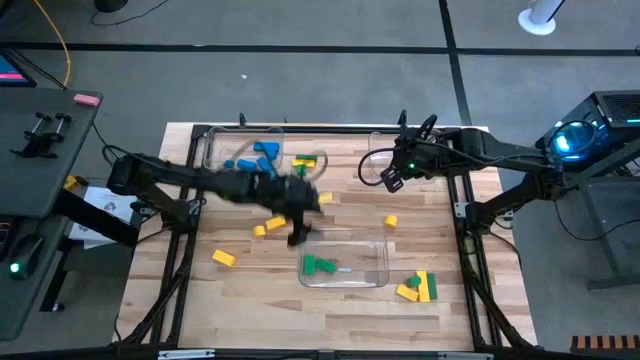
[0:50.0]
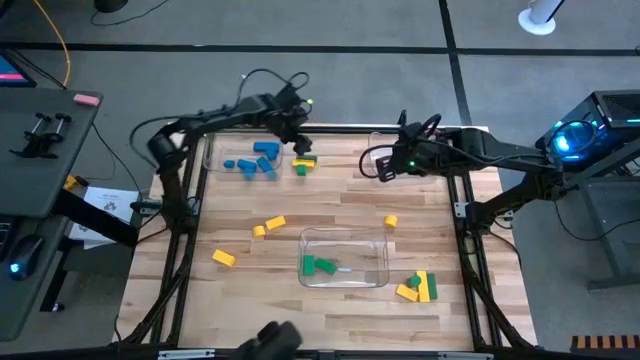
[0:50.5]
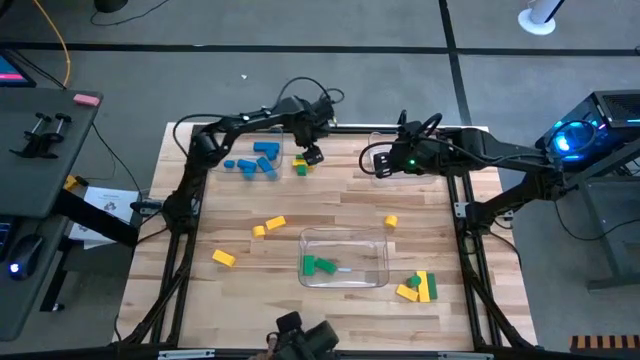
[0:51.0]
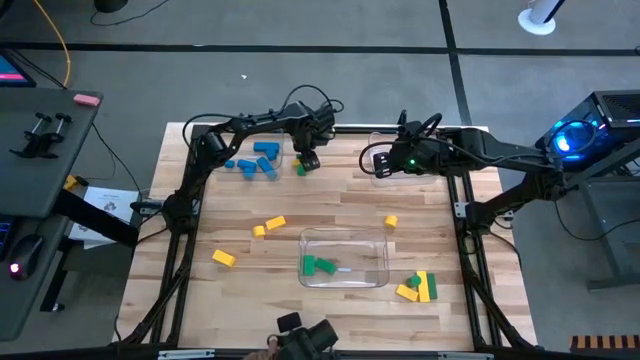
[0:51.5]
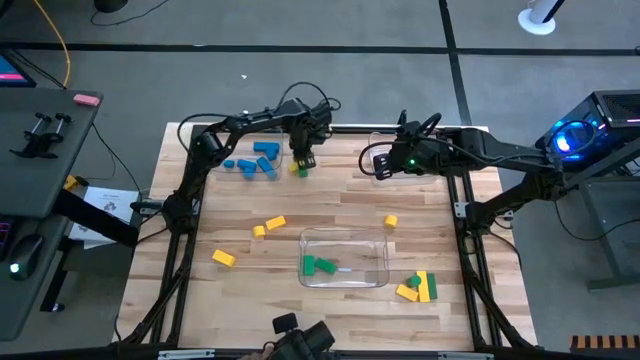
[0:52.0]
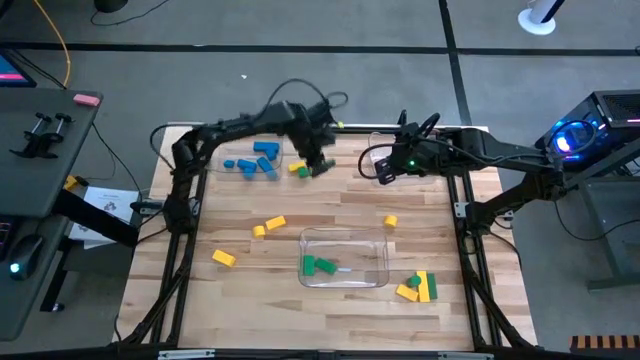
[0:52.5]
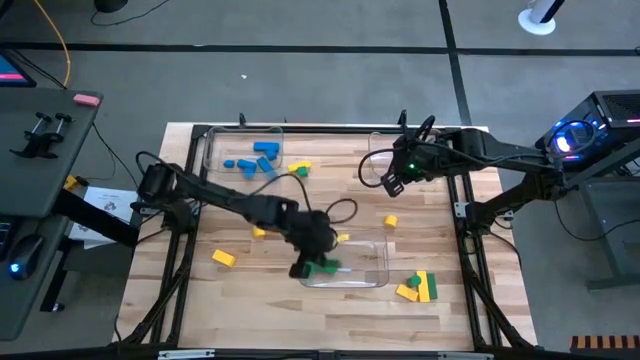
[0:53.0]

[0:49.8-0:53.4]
Task: Sort blocks
Put the green block into the bottom transparent bin

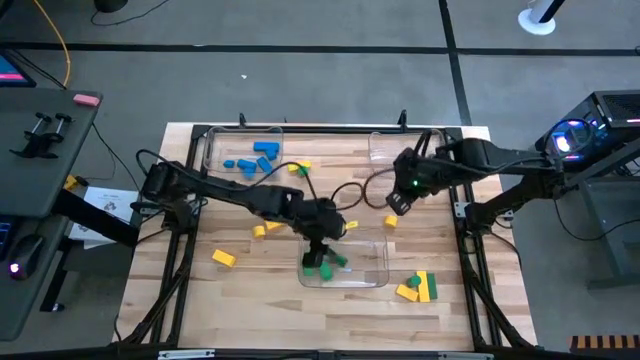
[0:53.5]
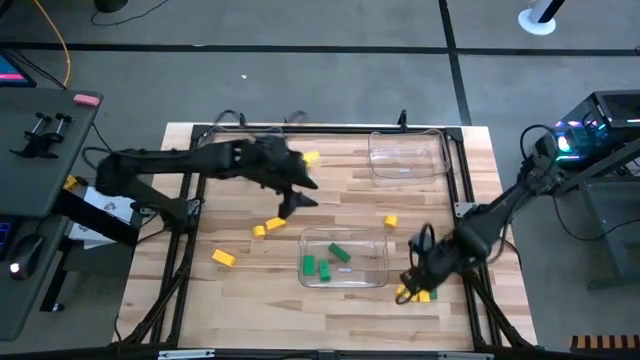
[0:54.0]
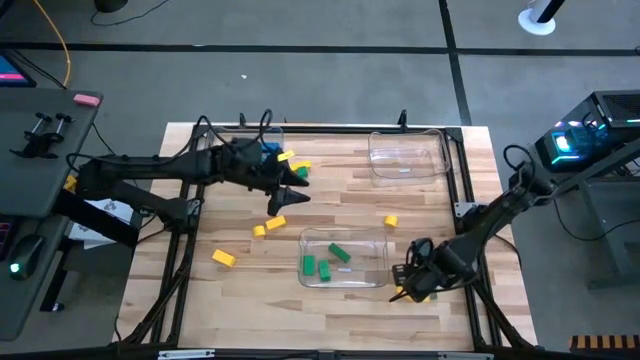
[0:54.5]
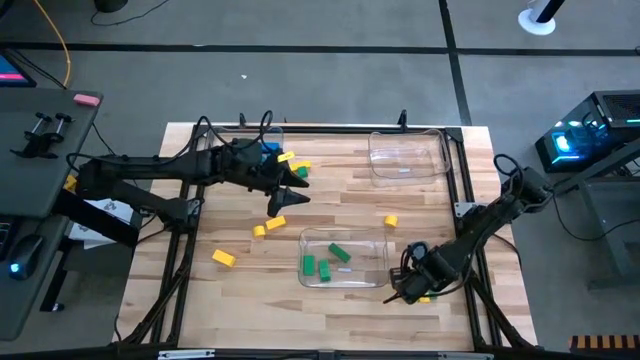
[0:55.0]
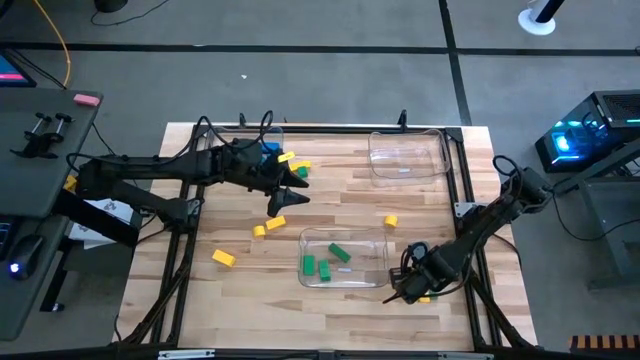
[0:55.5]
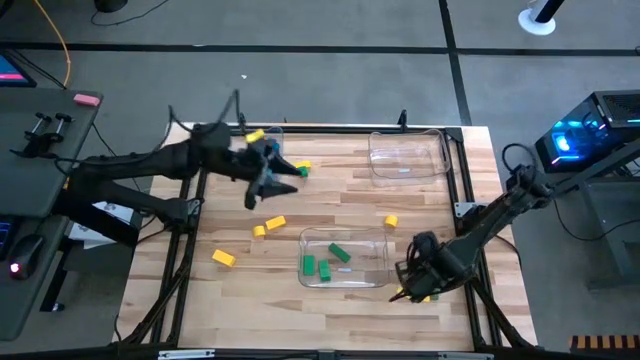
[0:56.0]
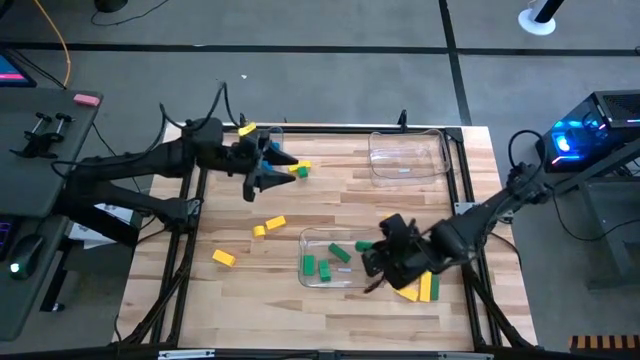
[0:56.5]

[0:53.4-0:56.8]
Put the green block into the bottom transparent bin

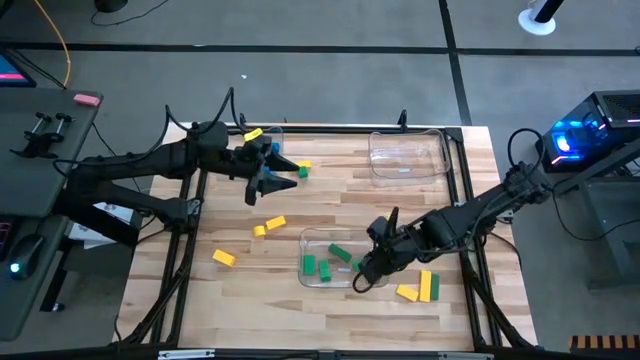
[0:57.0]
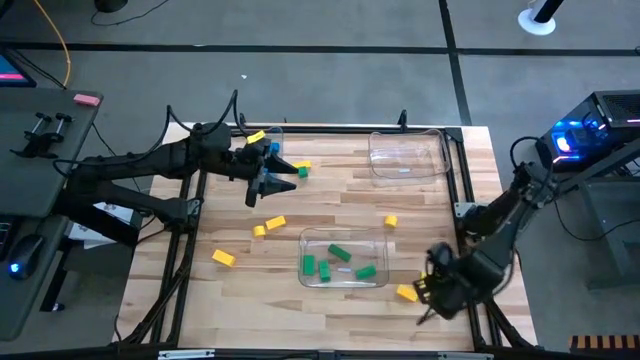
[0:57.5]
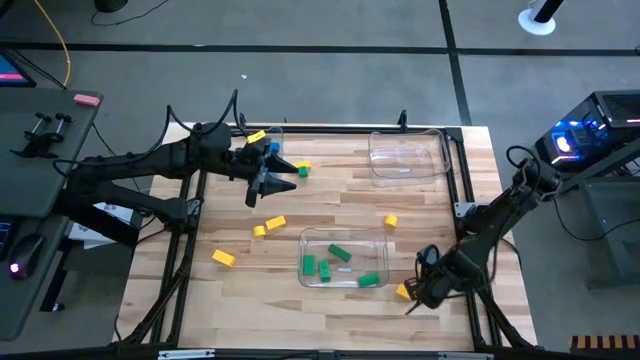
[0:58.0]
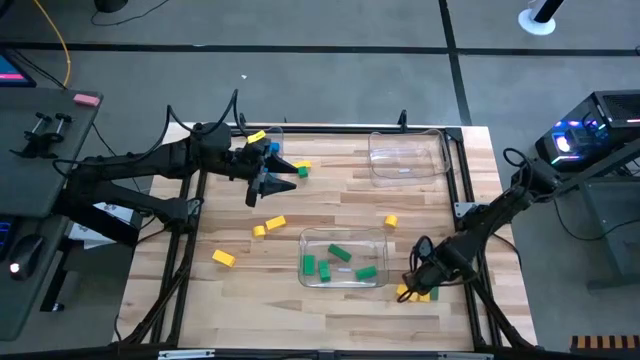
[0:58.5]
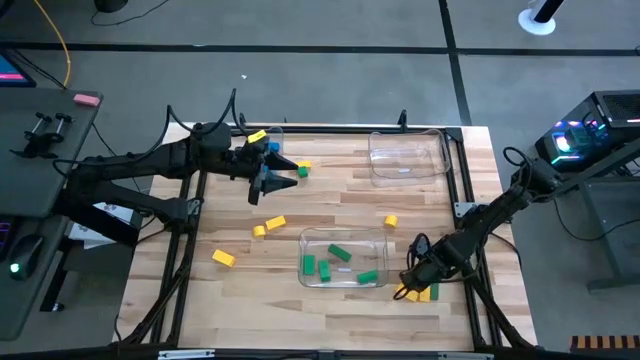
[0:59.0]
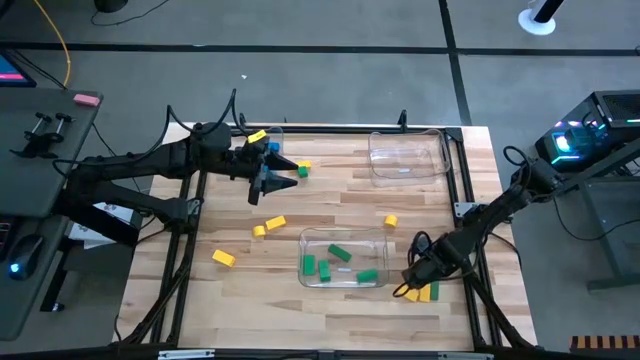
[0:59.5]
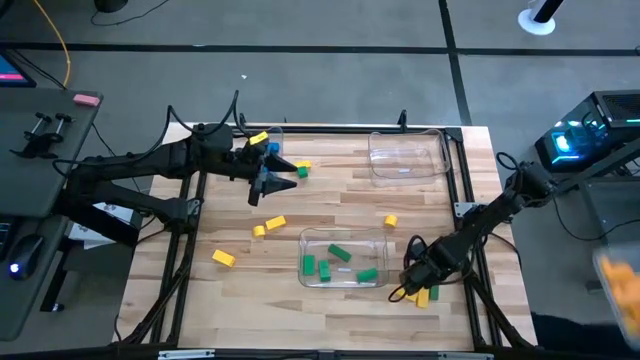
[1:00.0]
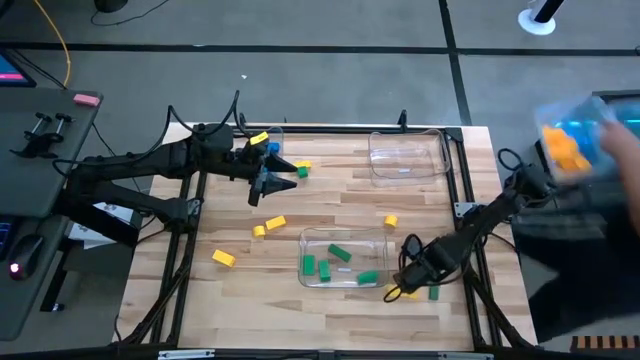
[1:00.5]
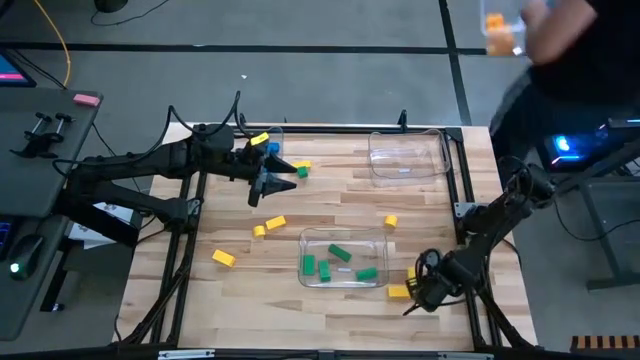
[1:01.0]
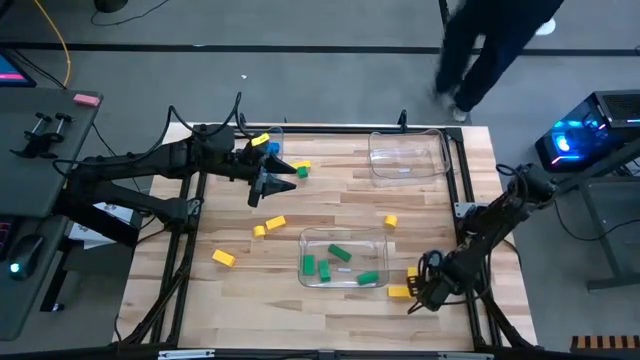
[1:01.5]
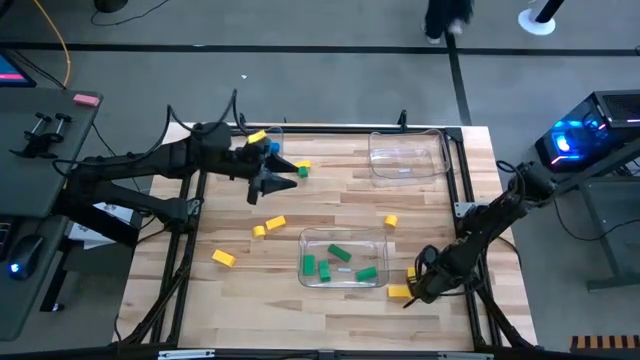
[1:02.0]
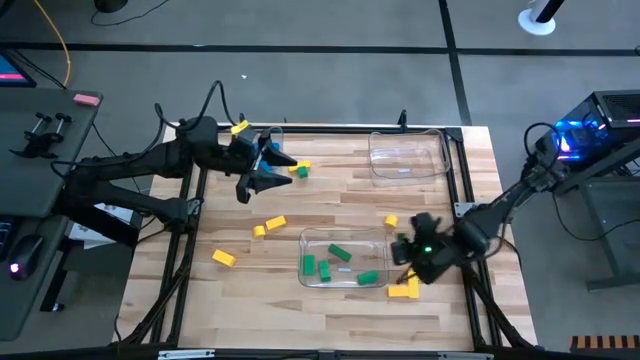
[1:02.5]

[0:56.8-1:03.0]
Put the green block into the bottom transparent bin

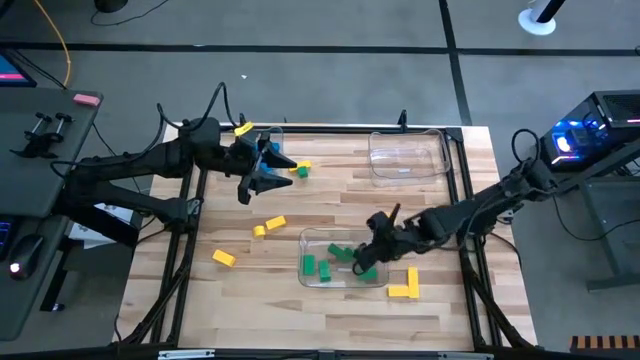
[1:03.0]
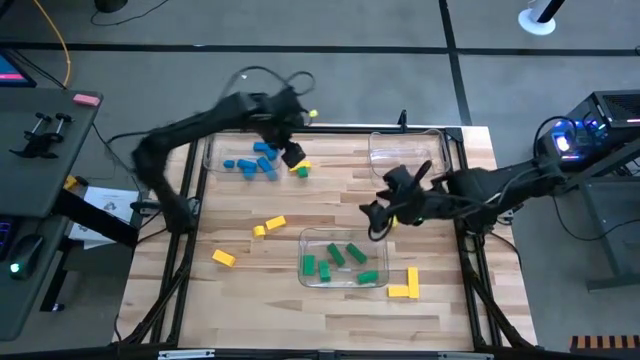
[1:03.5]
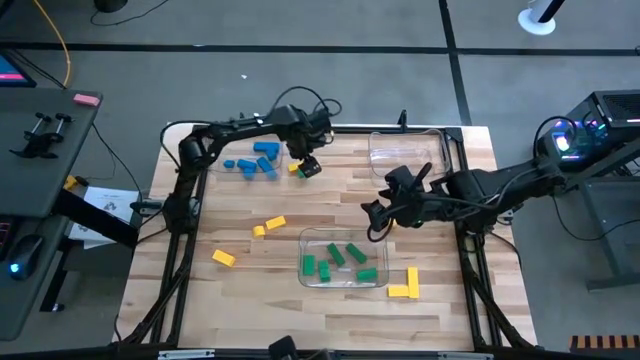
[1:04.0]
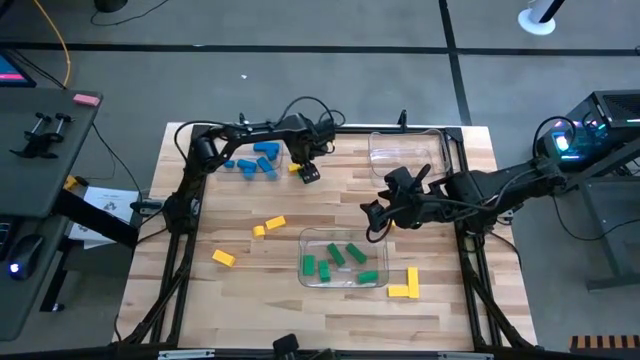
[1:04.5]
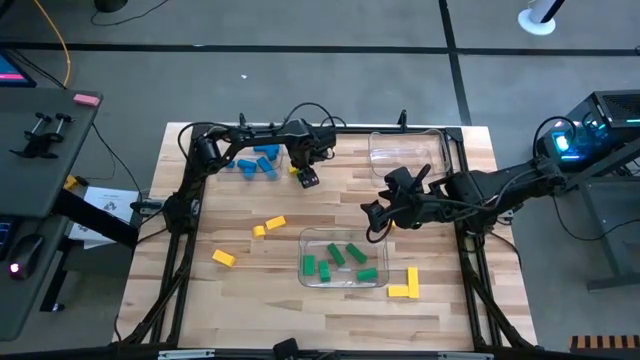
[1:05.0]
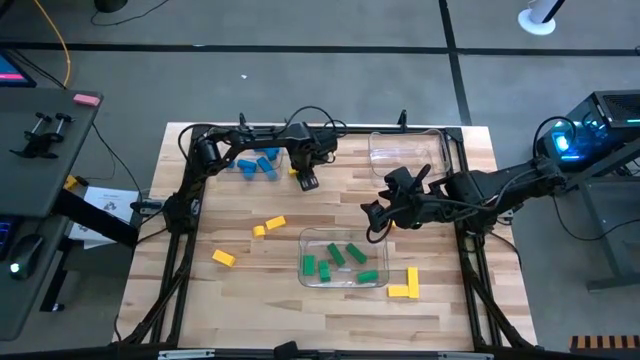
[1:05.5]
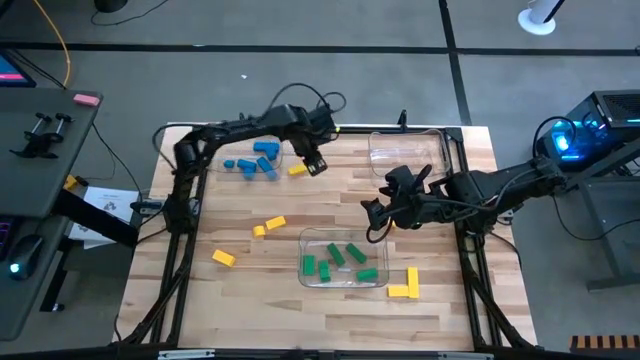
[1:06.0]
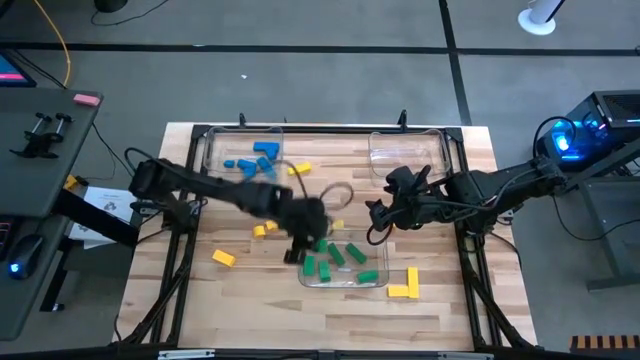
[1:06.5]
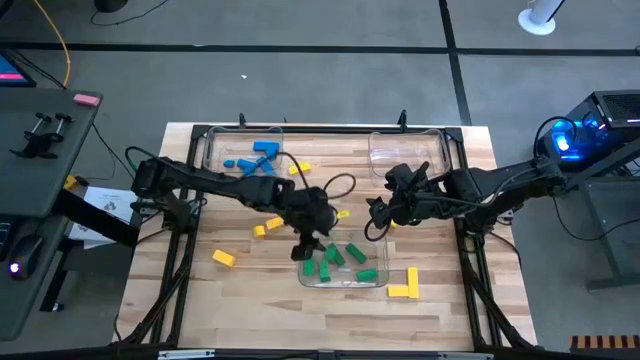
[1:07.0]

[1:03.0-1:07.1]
Put the green block into the bottom transparent bin

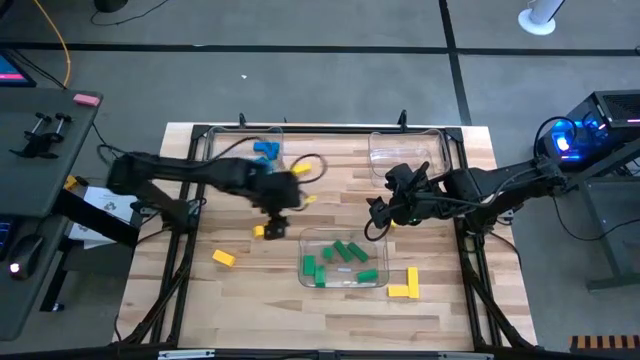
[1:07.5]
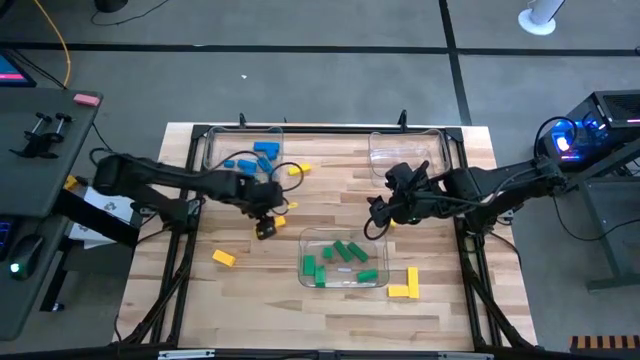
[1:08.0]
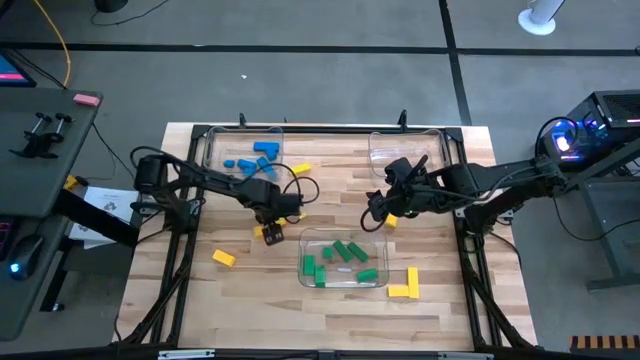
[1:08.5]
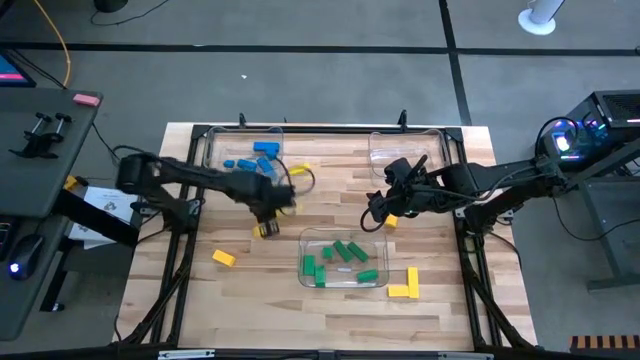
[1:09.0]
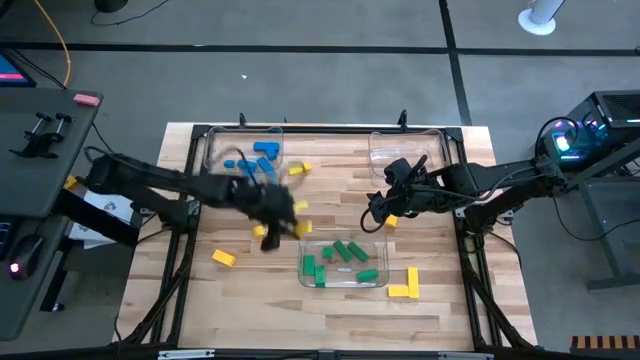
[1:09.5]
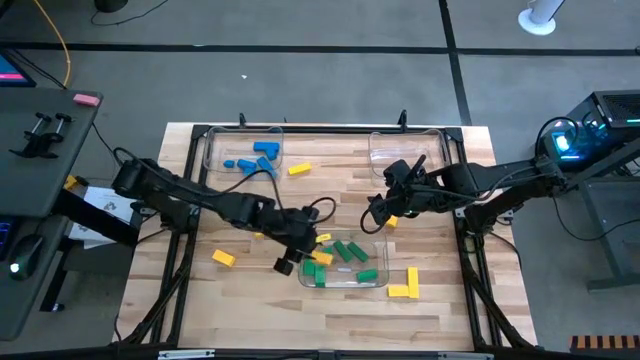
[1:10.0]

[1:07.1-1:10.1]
Put the yellow block into the right transparent bin

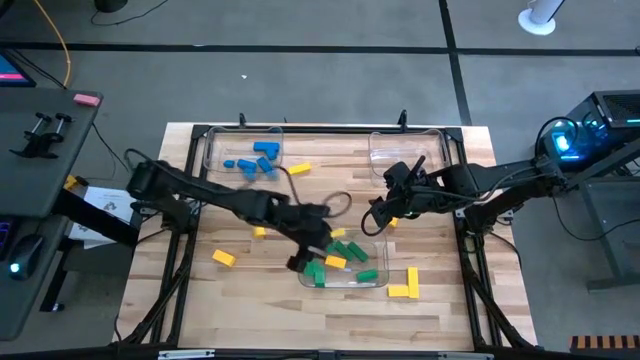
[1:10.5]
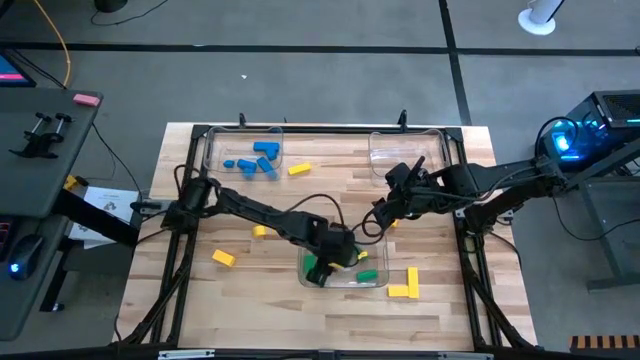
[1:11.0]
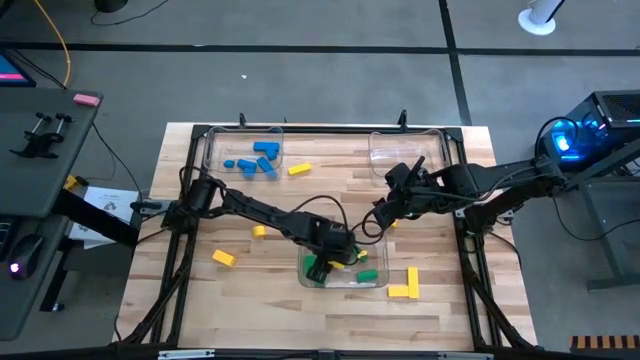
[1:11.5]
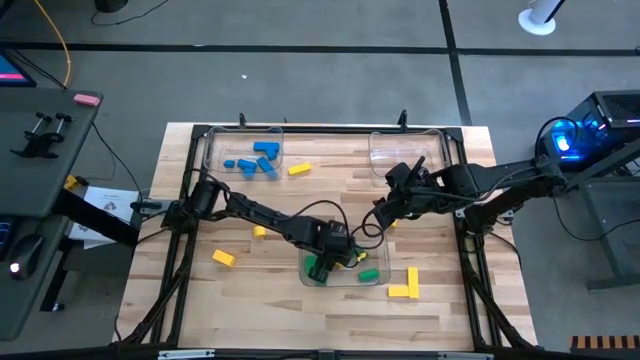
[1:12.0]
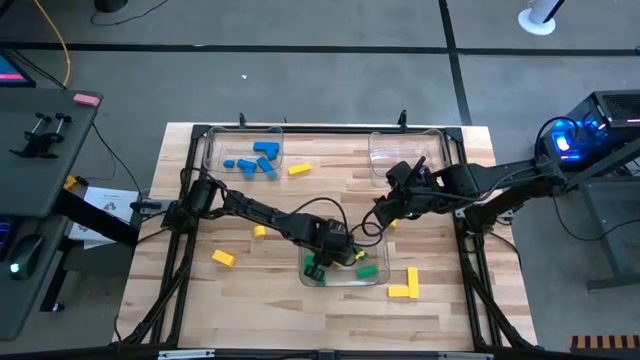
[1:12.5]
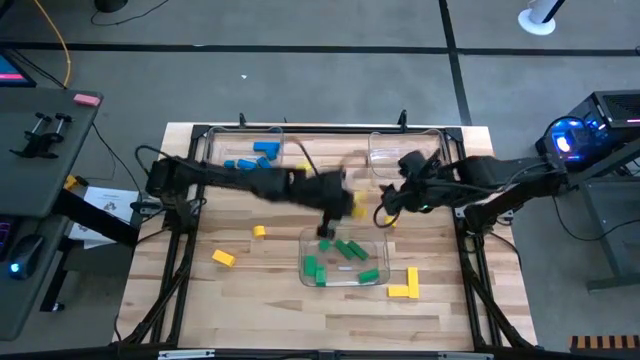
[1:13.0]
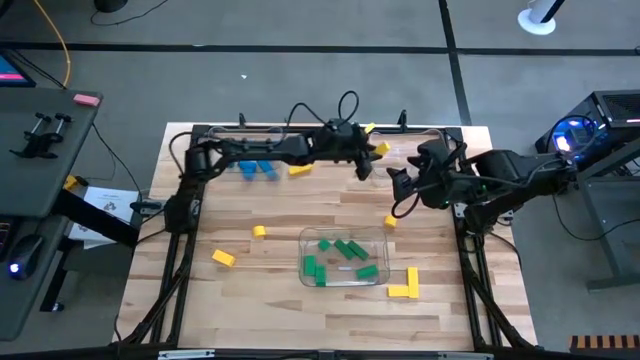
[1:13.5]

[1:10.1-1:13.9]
Put the yellow block into the right transparent bin
